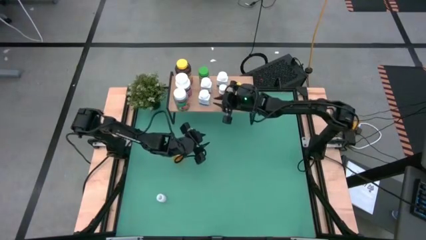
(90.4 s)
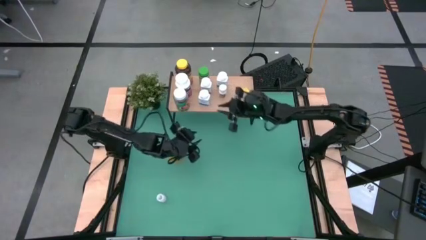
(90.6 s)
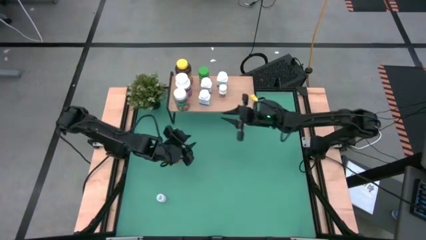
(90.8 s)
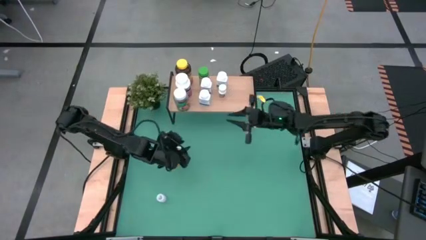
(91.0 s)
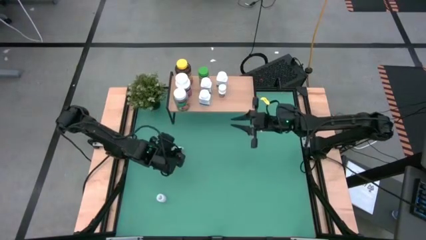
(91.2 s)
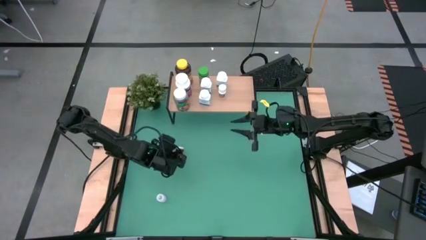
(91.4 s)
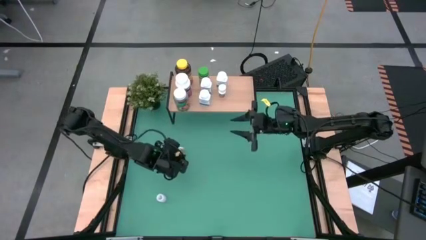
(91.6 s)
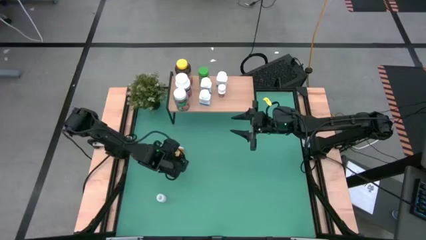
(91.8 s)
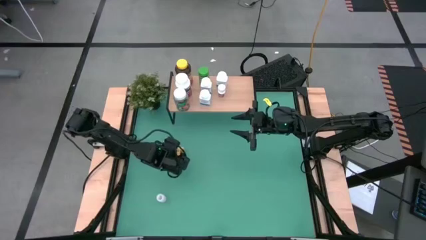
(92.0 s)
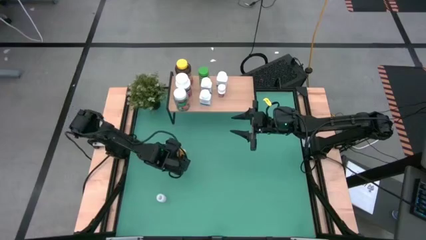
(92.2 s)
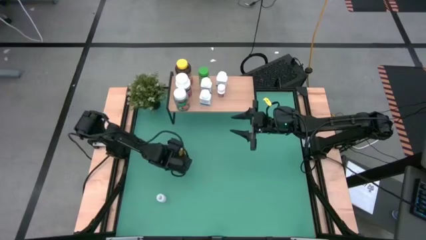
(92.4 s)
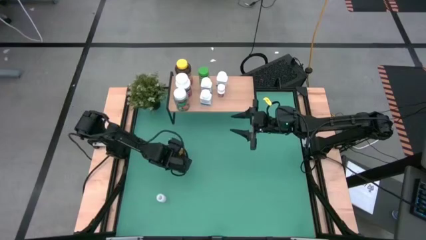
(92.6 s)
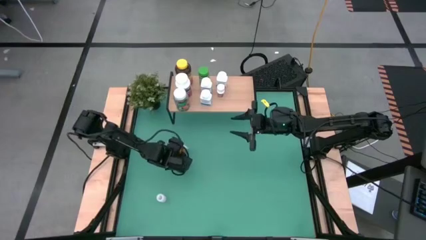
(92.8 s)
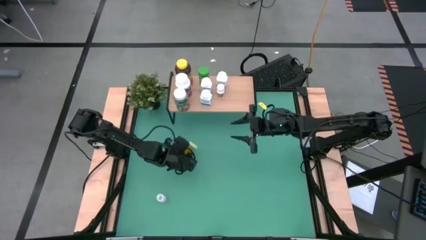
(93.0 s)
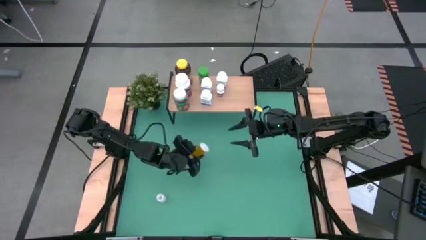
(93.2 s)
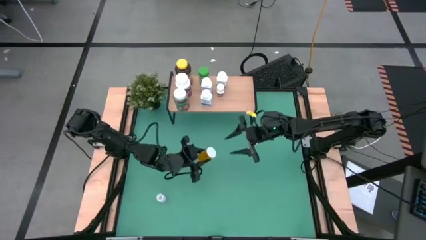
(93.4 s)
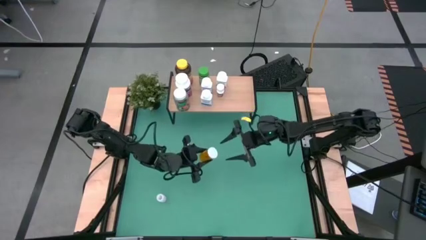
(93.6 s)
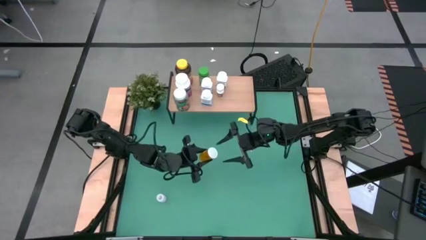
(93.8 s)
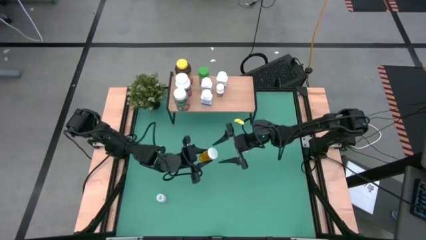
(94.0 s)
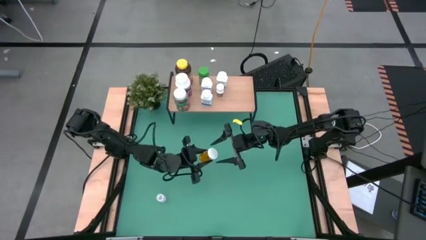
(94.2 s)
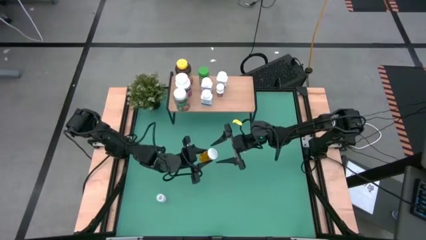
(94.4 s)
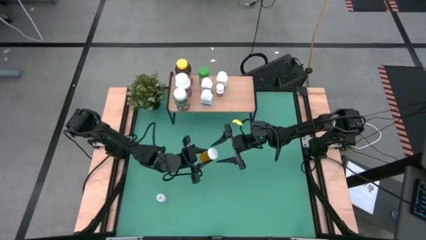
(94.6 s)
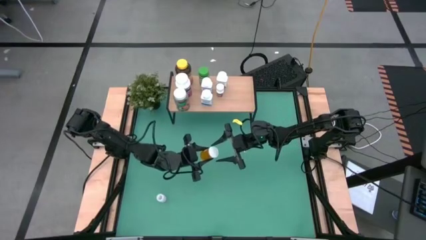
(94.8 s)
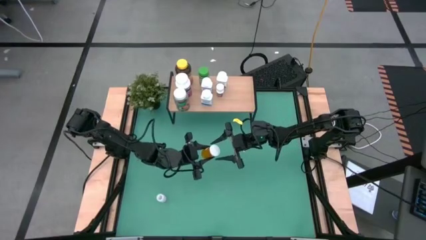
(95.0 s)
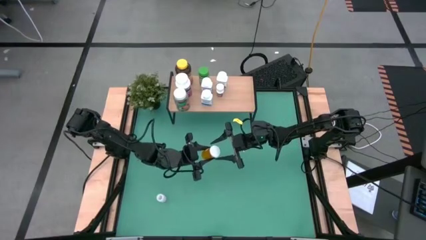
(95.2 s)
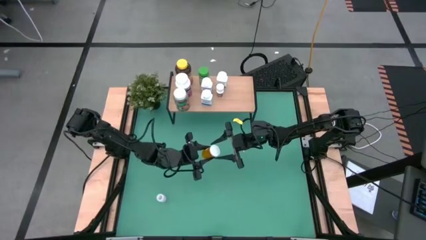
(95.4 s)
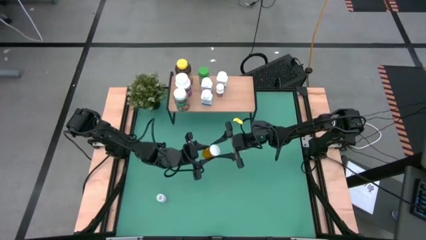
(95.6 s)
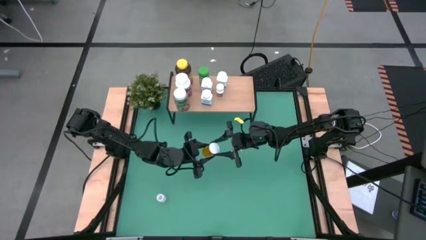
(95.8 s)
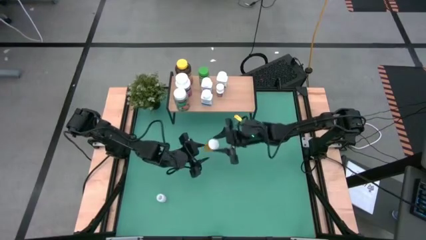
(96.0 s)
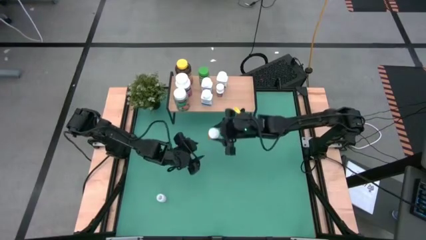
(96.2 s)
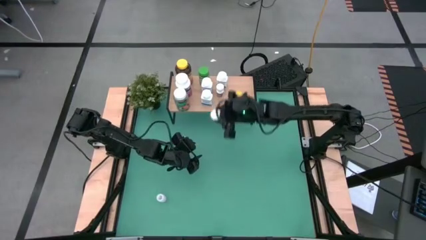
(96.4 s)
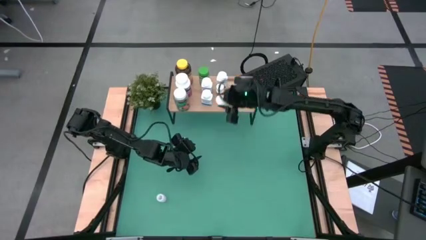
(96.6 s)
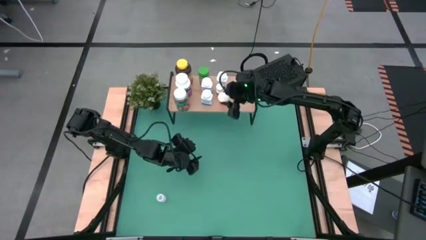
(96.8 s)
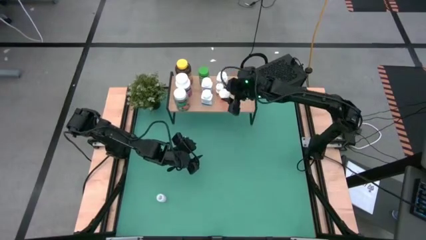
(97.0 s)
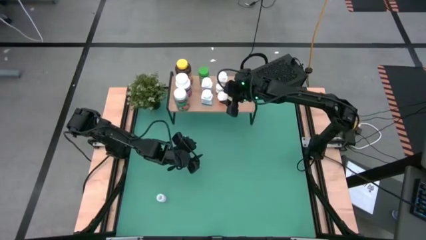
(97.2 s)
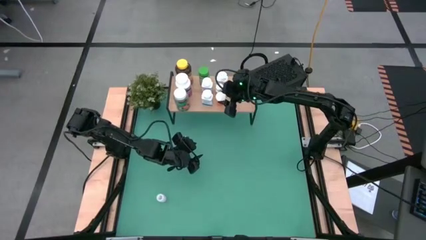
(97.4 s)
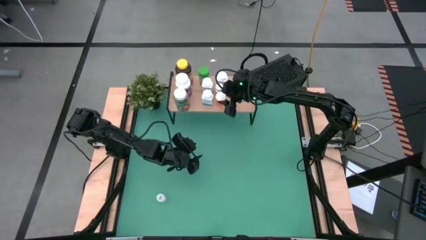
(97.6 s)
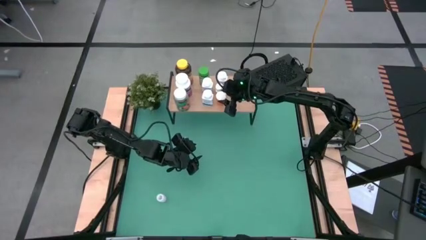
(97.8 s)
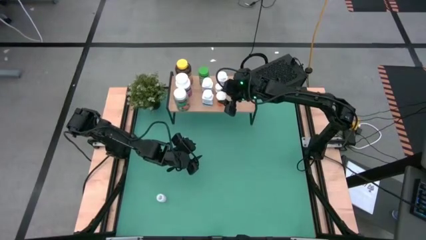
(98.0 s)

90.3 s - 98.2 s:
Task: Pick and place medicine bottles onto shelf by color
Put the orange pill bottle on the shelf

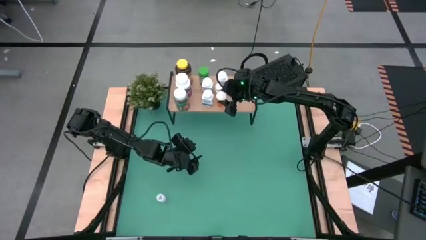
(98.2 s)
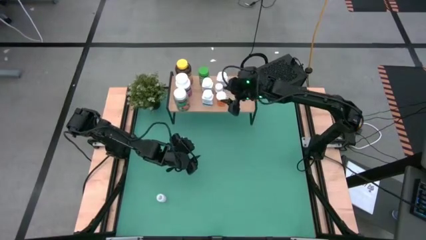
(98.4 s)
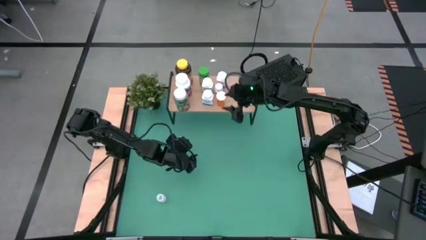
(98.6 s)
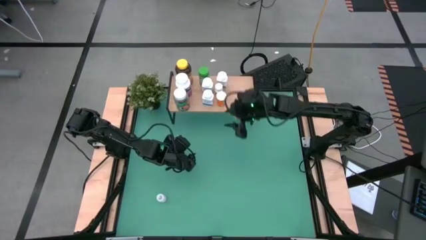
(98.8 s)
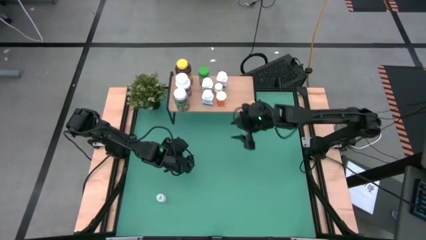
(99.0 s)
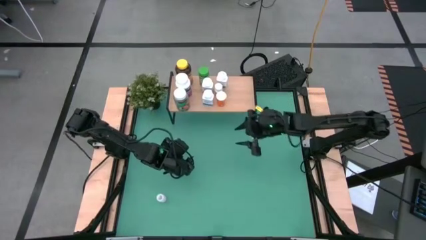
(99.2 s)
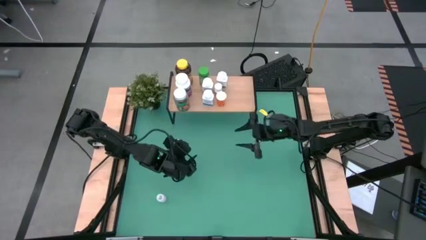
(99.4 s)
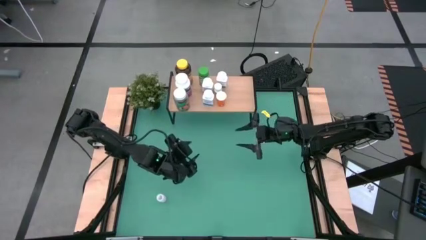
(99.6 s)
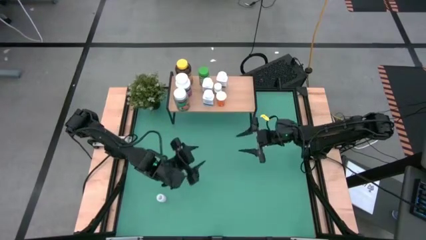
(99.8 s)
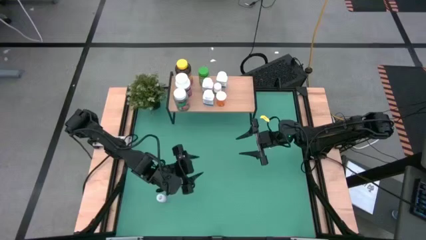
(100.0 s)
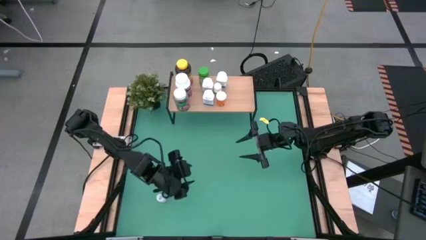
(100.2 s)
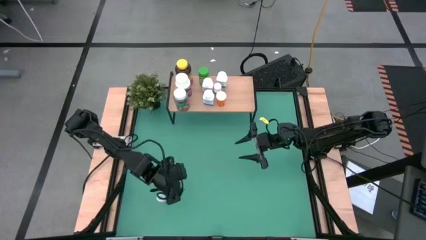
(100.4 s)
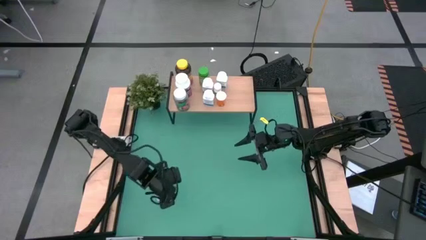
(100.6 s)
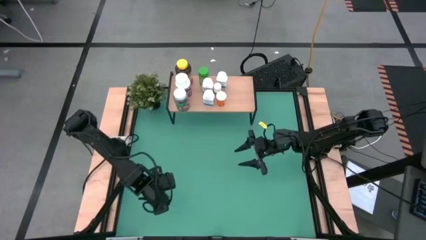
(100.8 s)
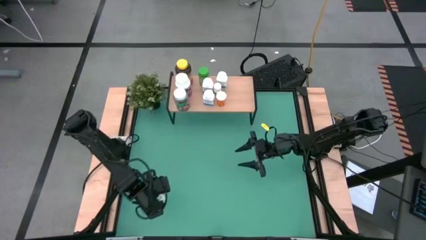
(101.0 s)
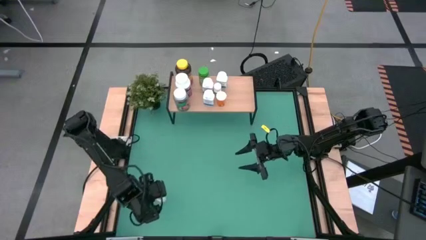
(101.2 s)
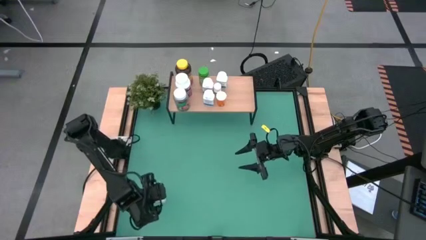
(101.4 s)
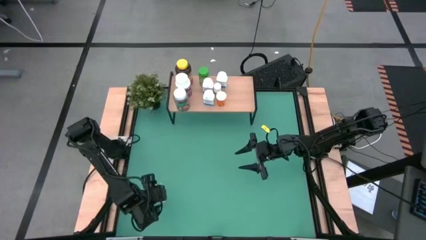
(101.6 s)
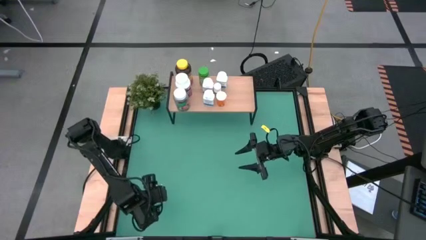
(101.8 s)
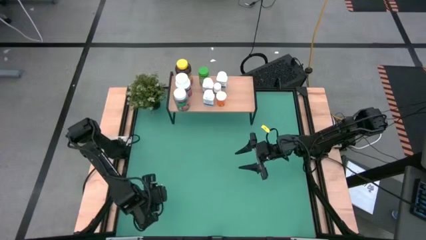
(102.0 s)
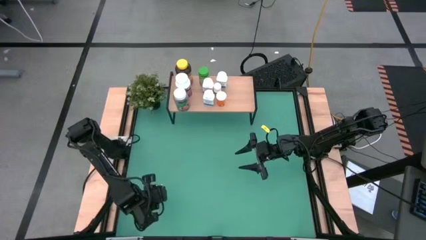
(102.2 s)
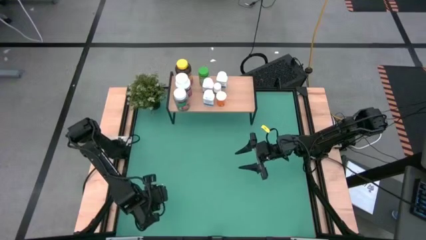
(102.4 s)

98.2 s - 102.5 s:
Put the transparent pill bottle on the shelf

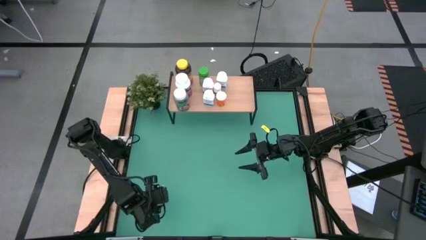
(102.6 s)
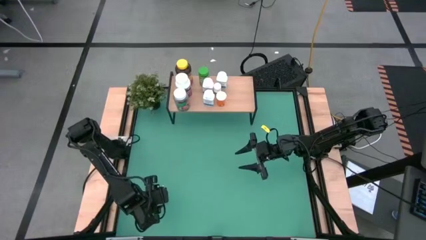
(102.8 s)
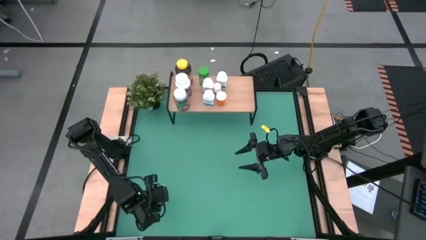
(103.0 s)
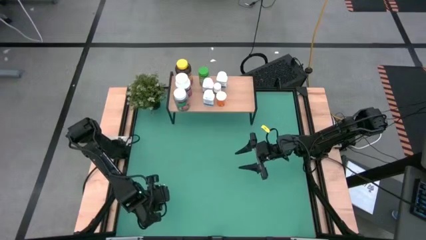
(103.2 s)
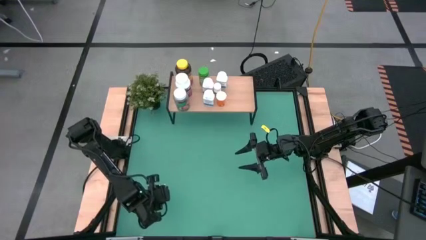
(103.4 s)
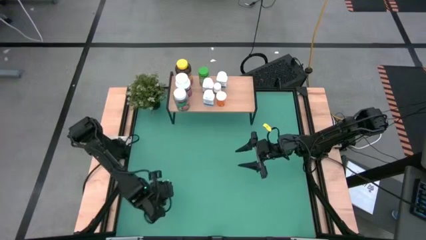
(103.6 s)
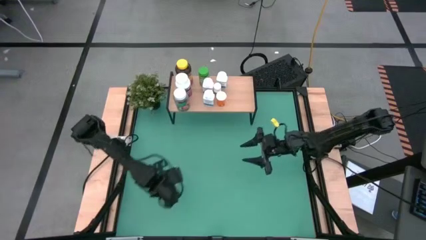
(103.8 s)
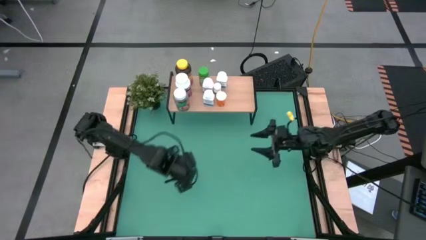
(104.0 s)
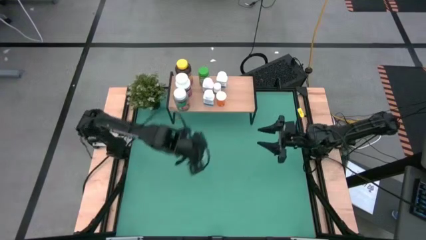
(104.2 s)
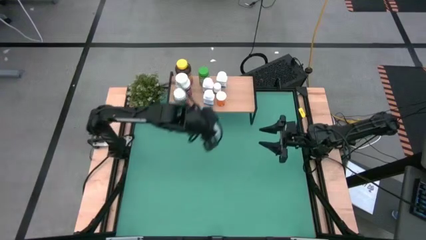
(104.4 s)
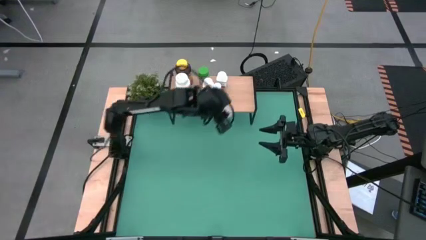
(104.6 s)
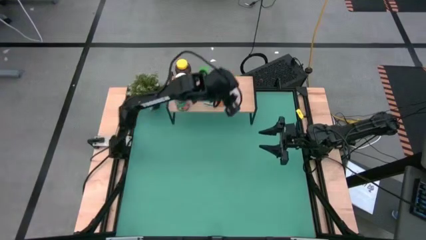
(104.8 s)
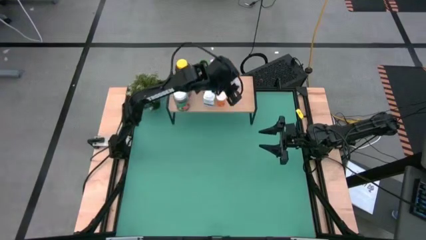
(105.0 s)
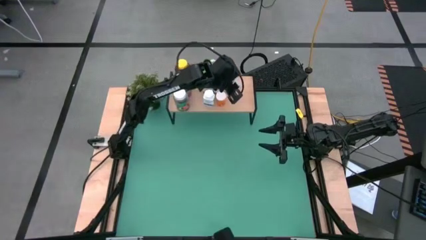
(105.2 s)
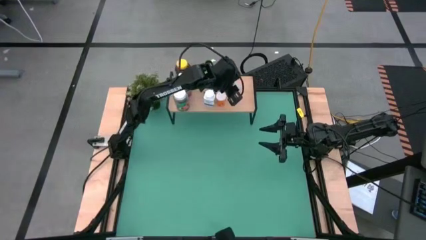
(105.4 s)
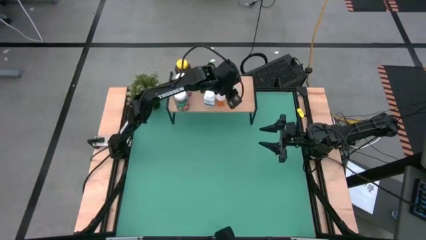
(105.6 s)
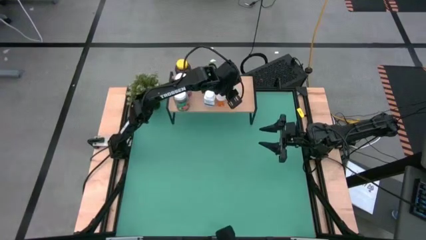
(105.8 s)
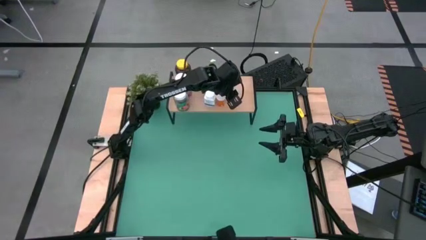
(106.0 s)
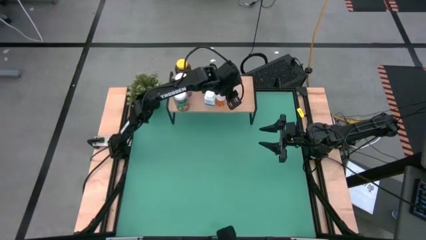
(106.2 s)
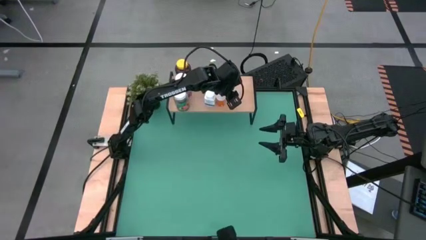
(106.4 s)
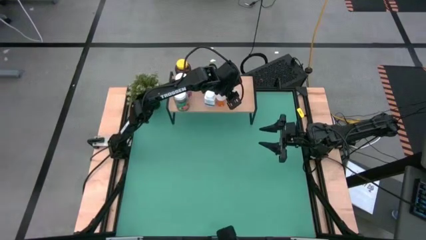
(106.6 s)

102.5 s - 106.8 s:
Put the transparent pill bottle on the shelf
